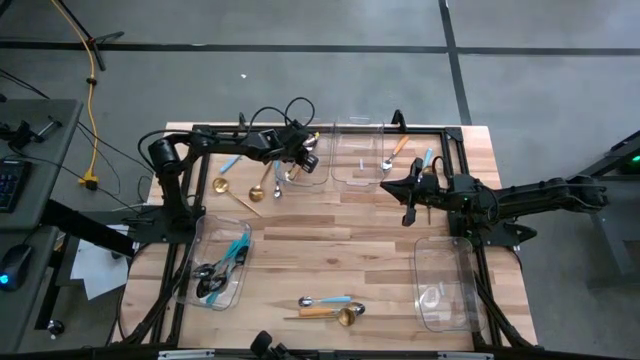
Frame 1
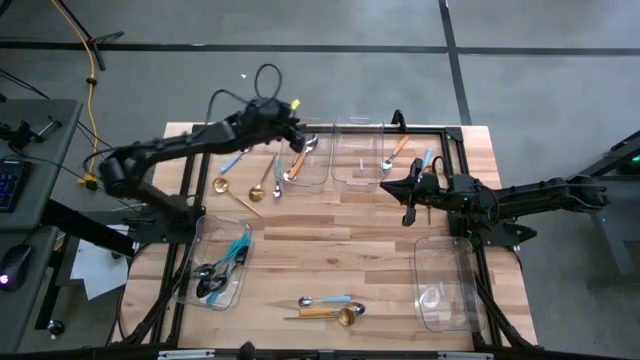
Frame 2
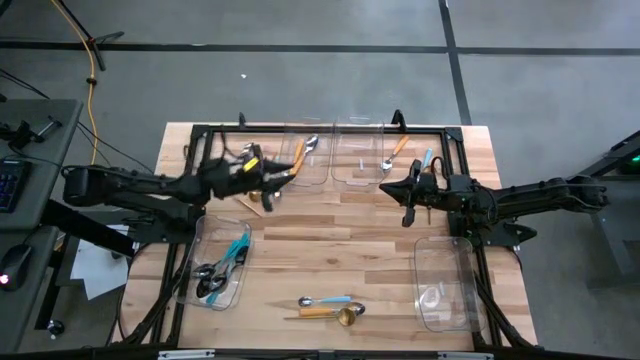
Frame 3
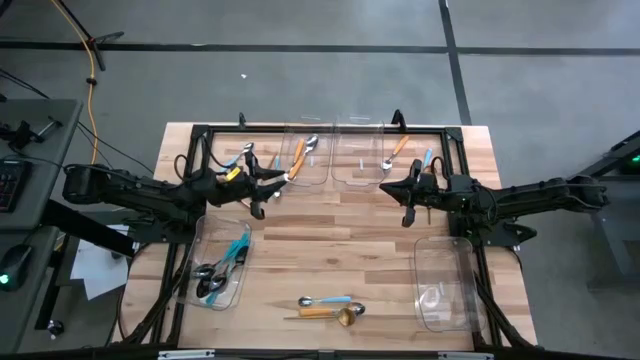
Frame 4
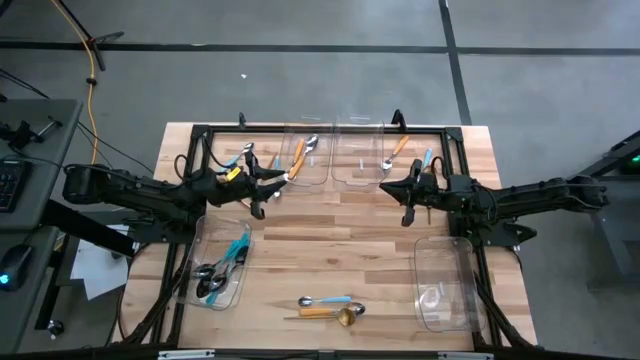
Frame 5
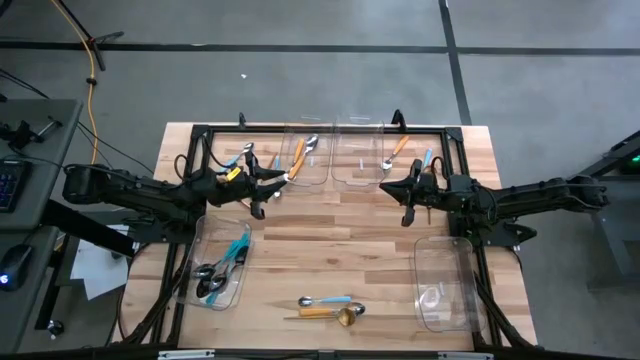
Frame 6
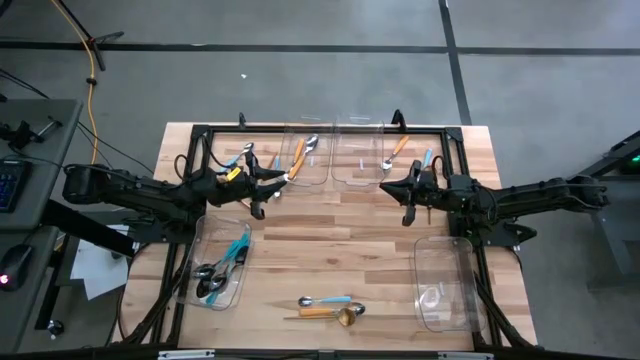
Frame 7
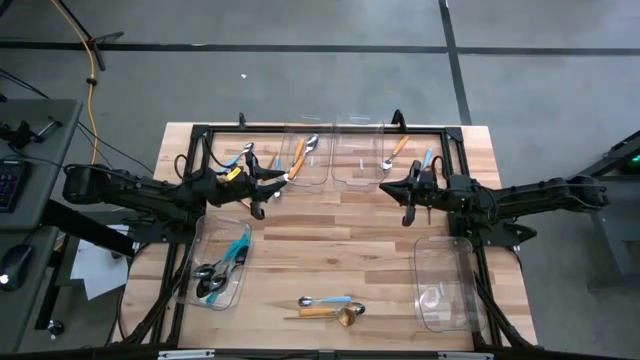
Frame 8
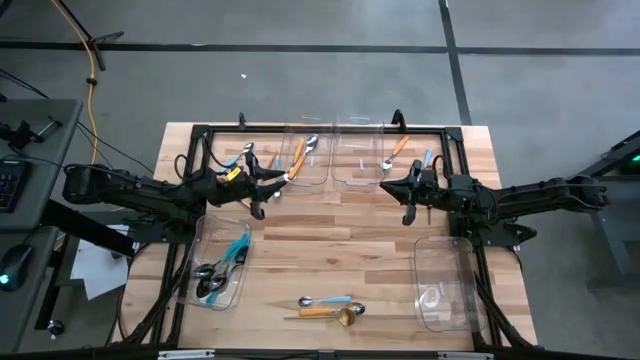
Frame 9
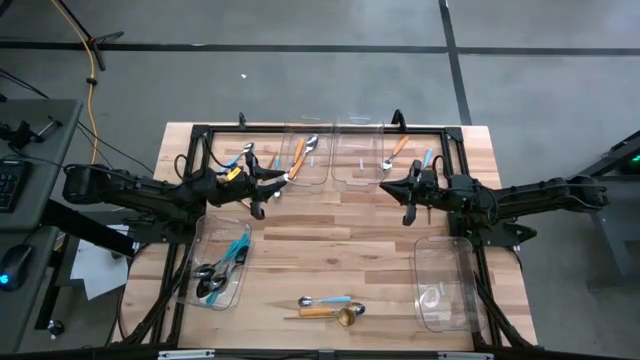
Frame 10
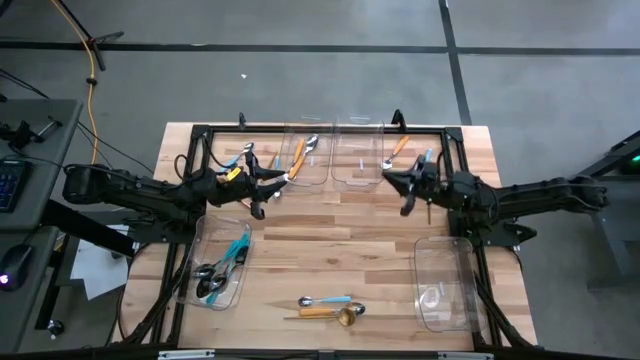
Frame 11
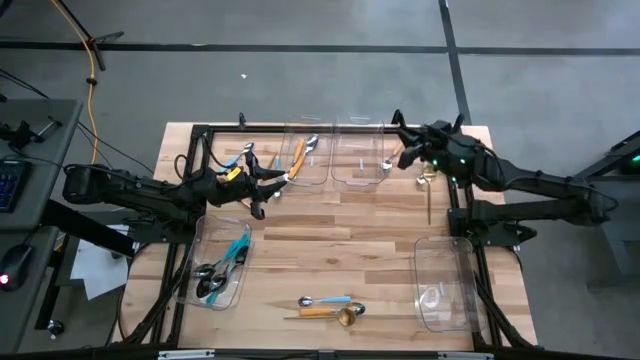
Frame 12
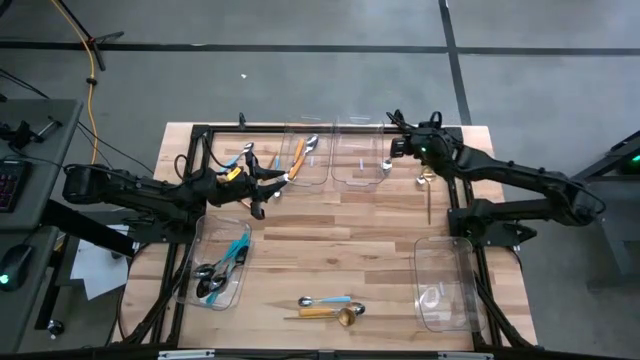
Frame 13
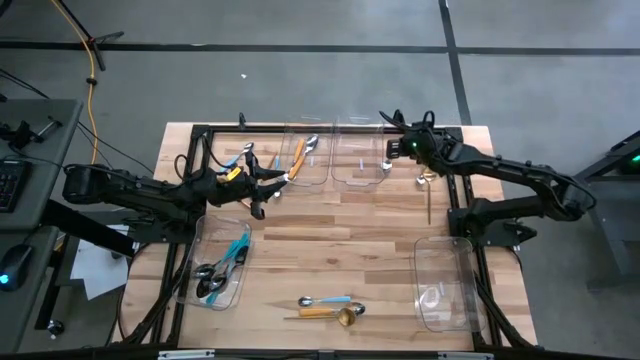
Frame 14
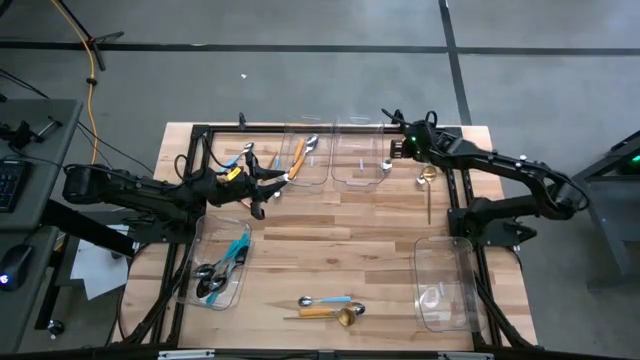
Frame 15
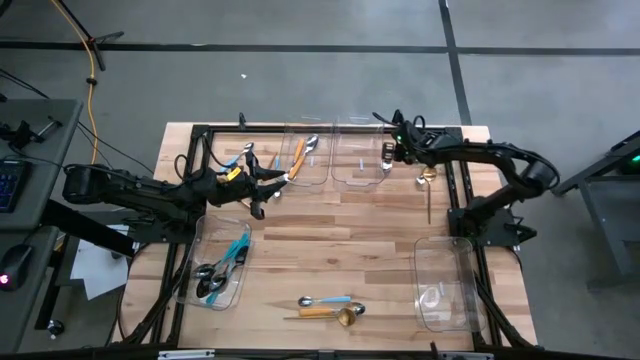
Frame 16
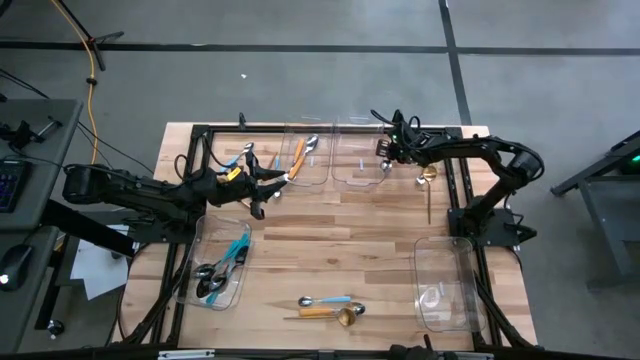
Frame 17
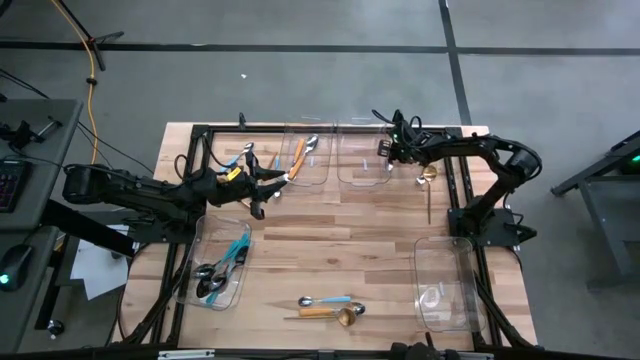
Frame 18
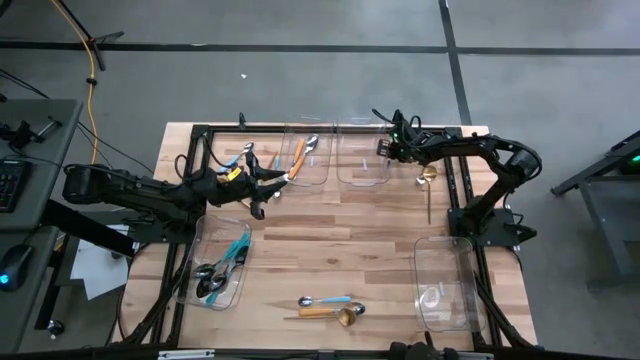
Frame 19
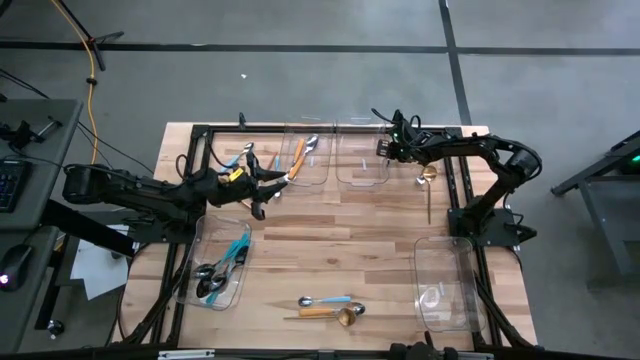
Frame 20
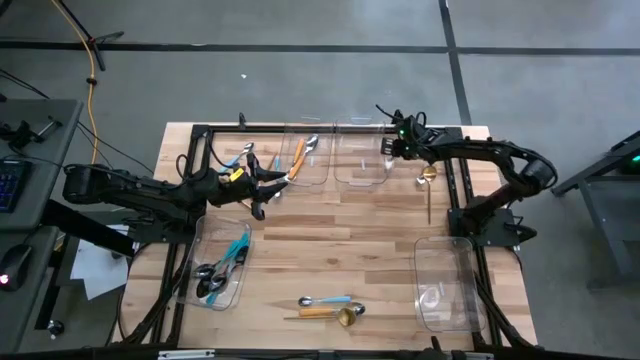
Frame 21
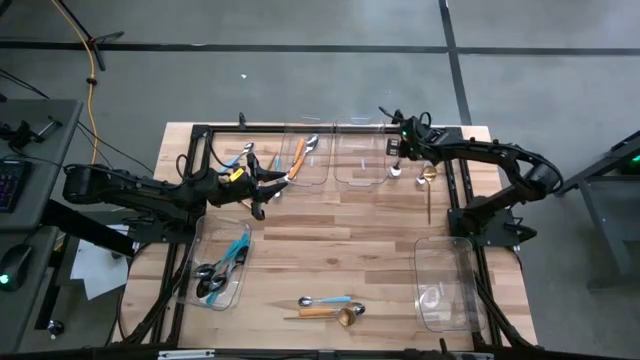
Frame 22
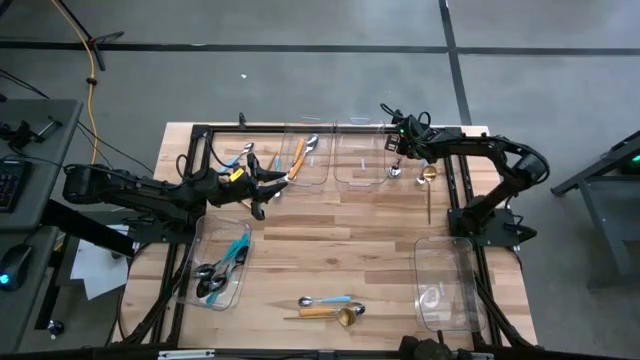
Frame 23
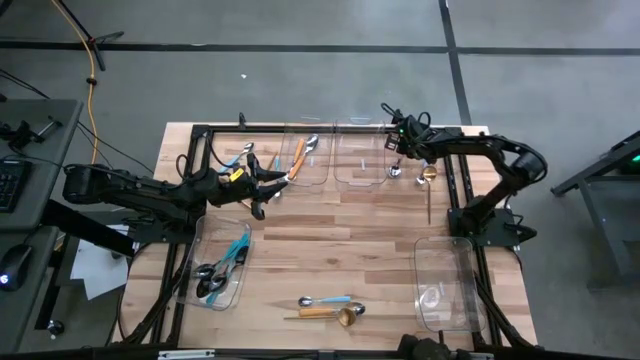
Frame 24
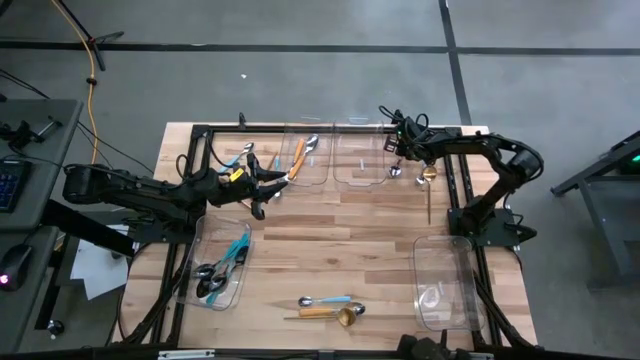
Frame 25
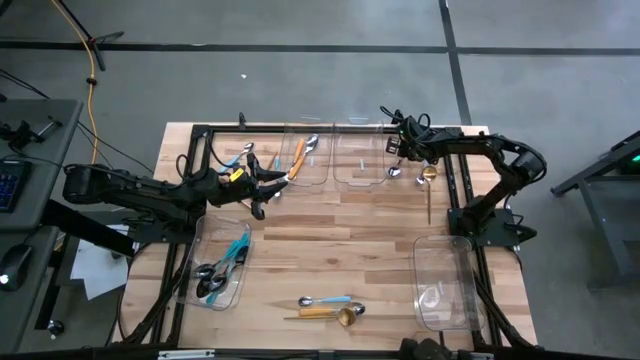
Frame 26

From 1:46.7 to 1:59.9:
Task: Sort silverware by color (type)
Put the yellow spoon into the top left transparent bin
